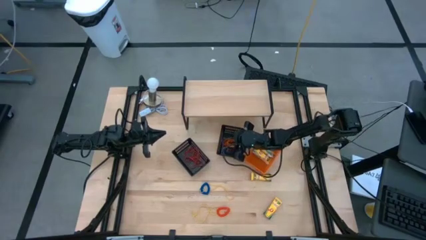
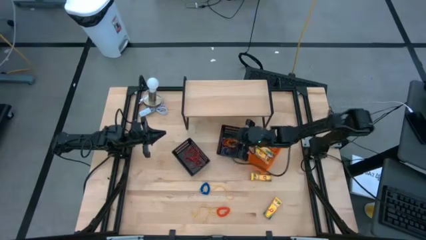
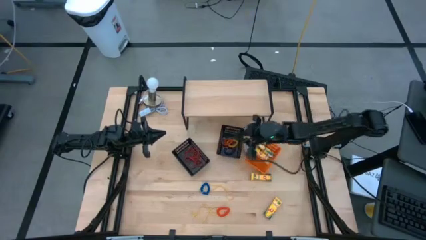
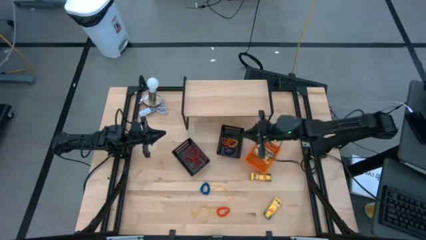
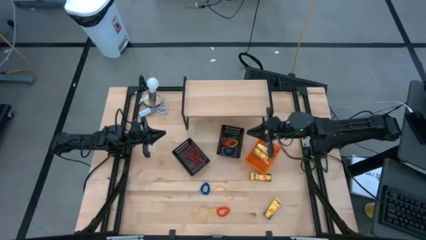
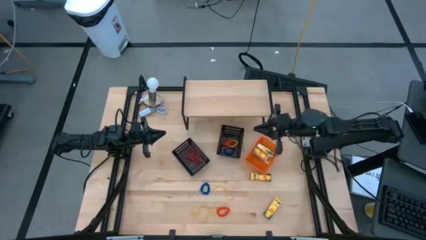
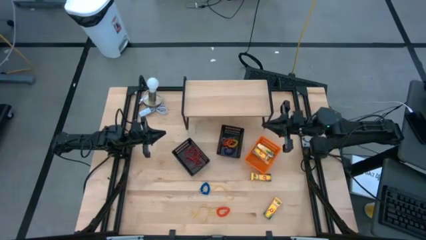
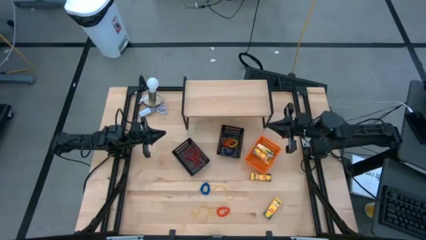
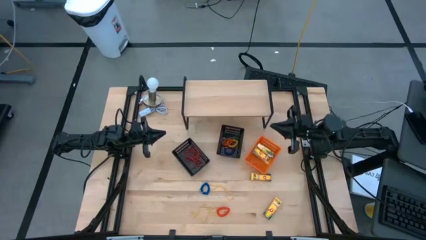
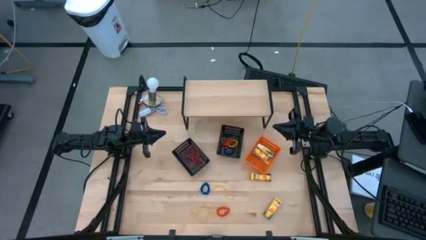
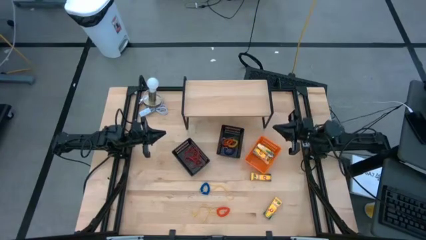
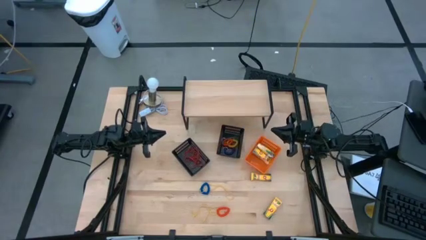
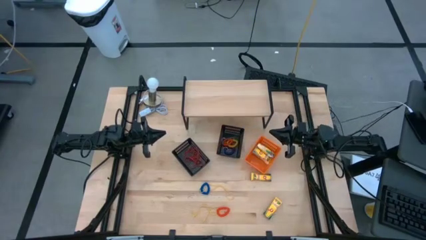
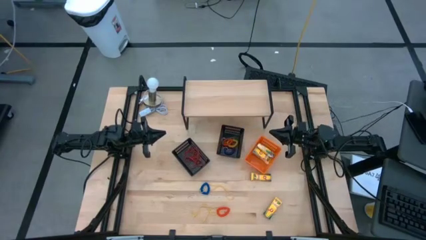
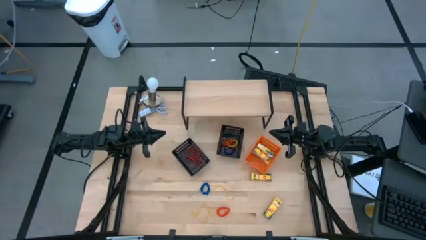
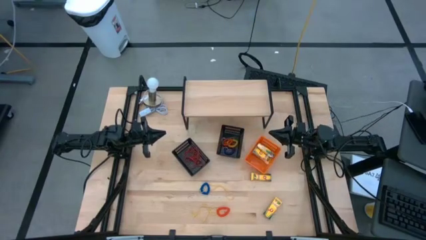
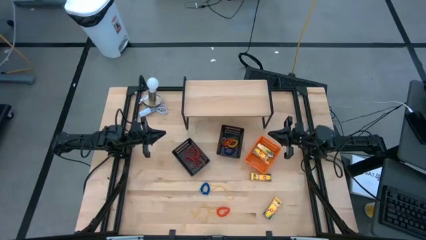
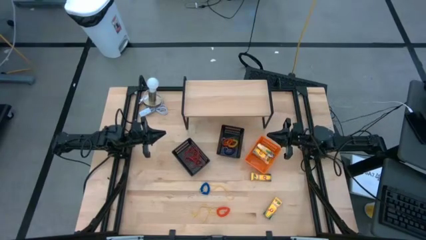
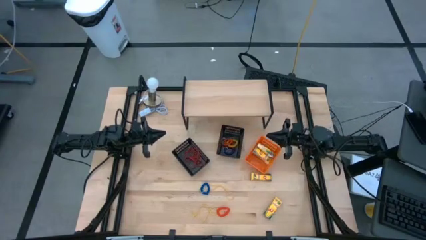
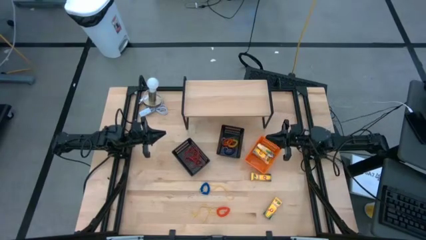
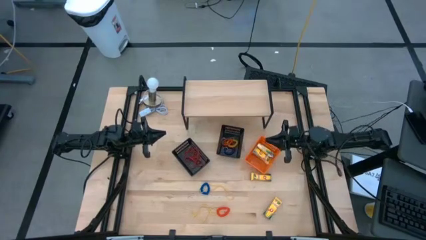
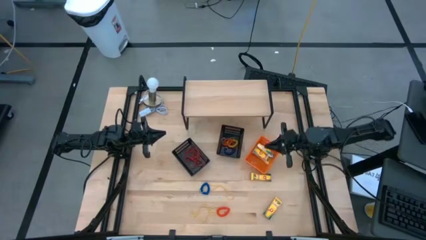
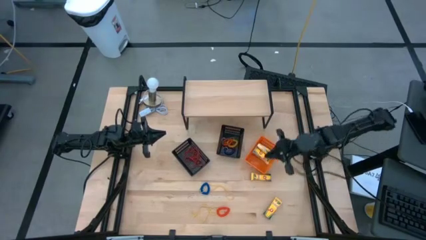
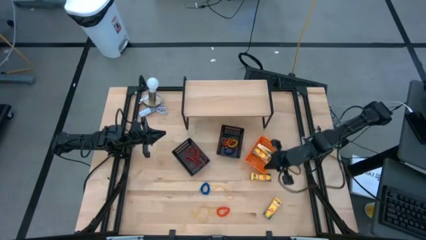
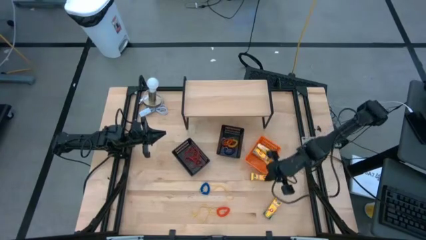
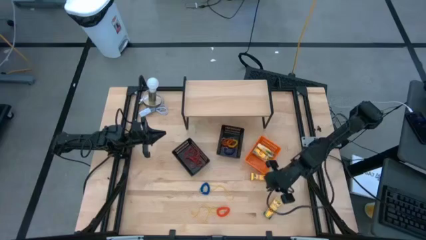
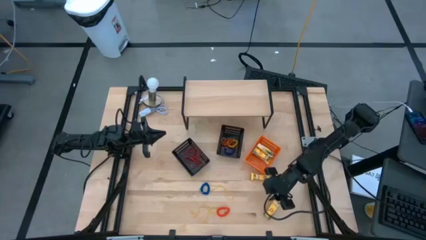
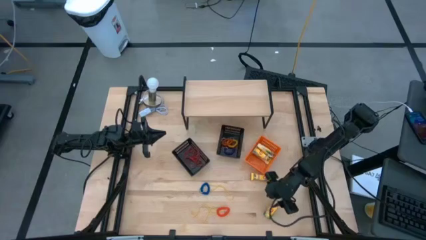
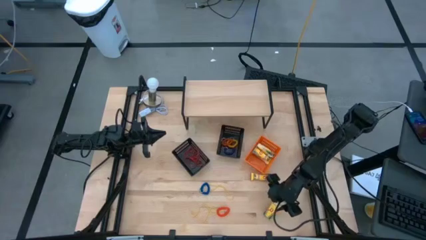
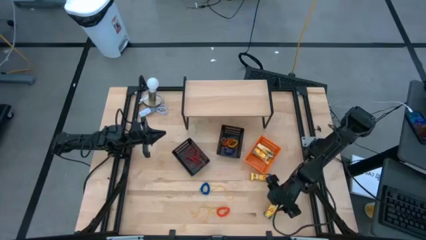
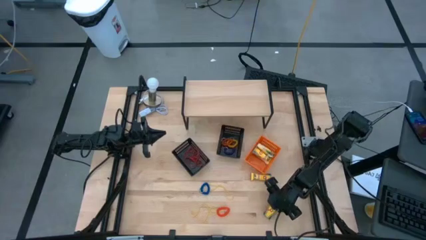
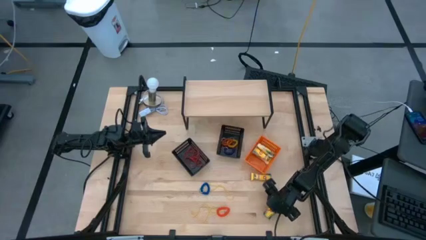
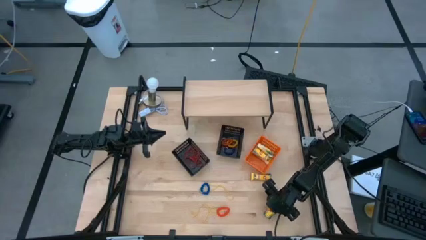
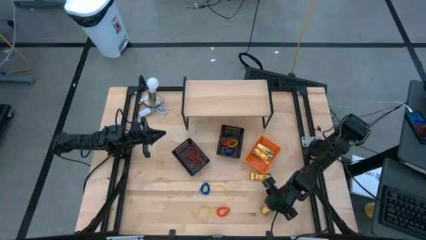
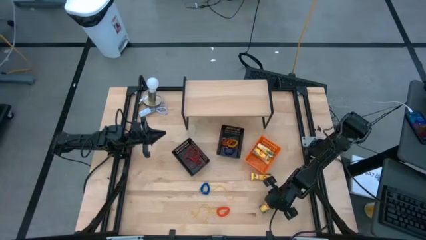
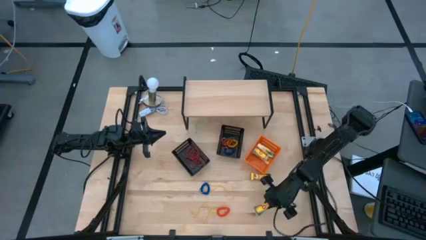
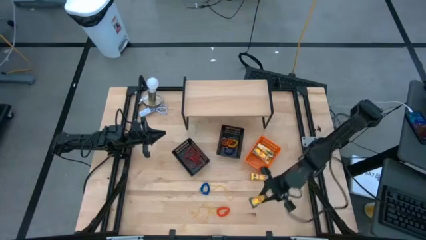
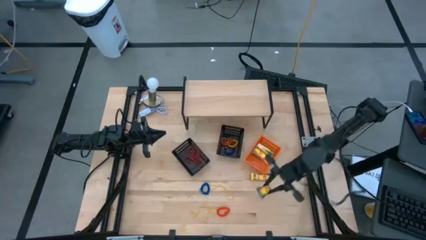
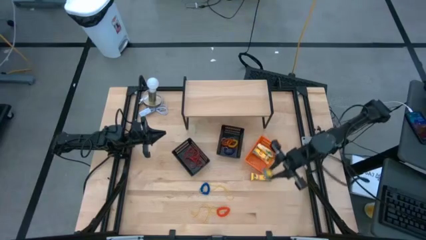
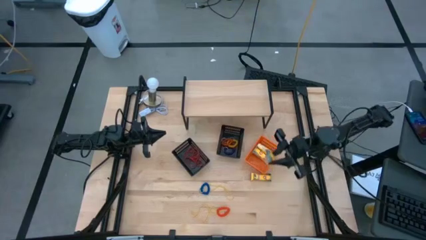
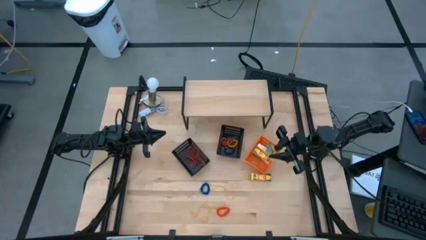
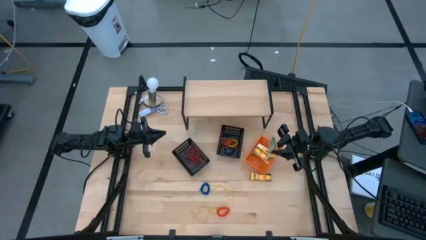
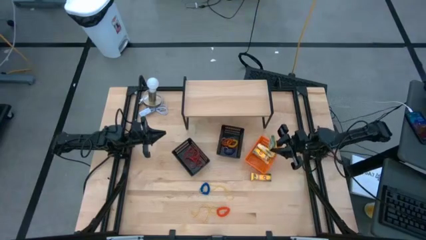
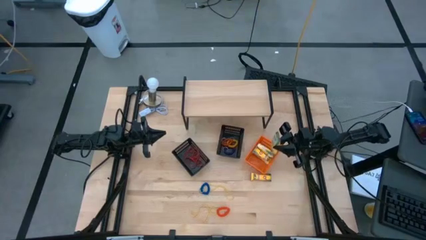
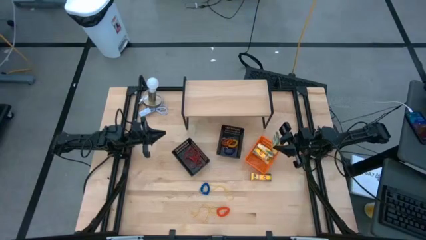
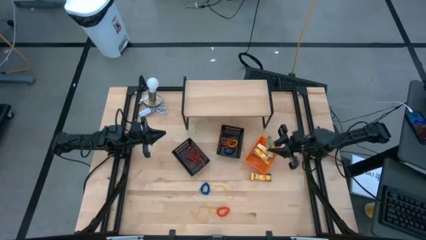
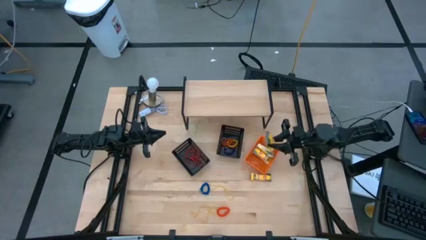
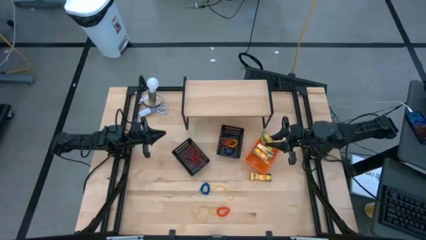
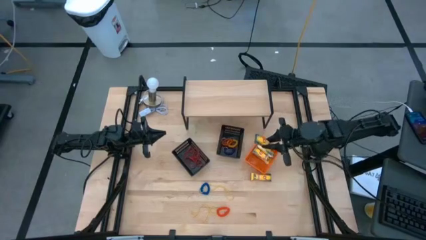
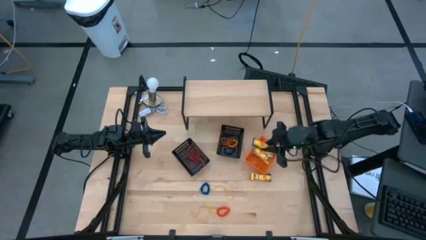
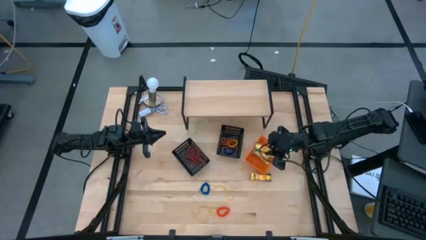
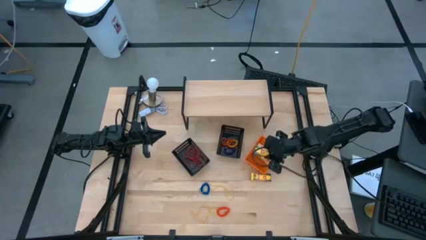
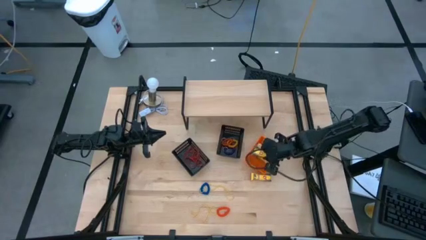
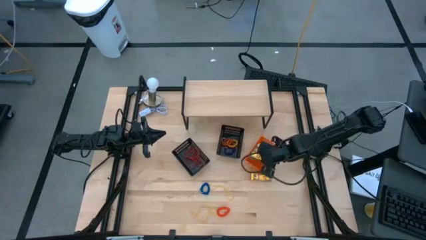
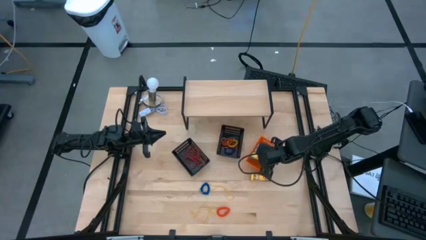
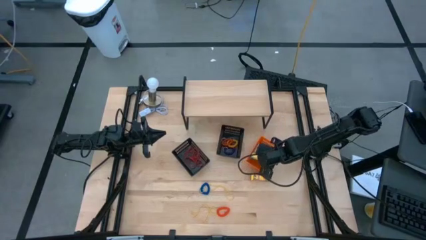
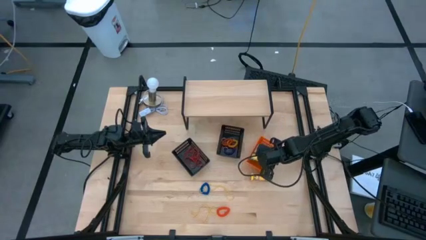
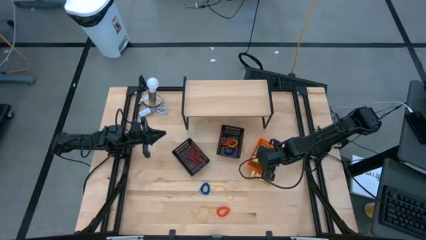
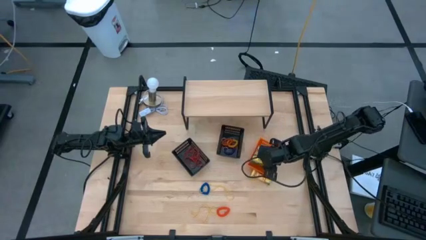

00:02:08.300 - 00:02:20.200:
Task: Pick & Place Office Desk Supplies
Put the crayon box into the orange bin

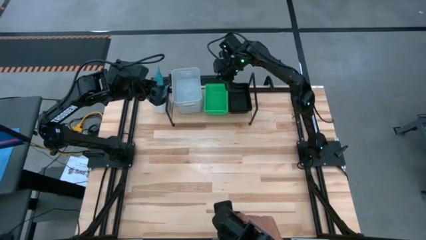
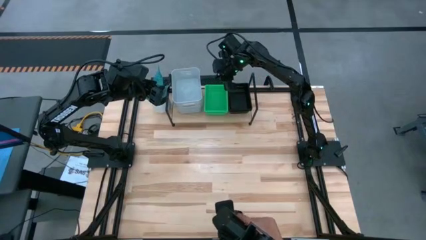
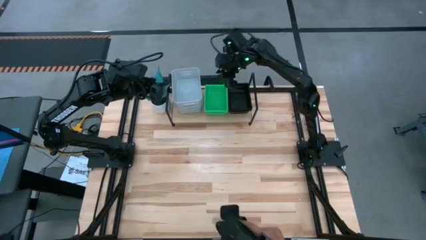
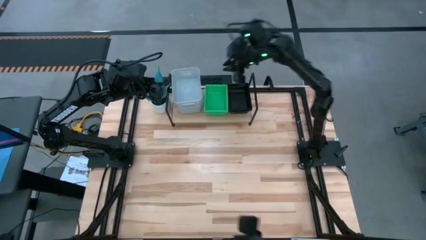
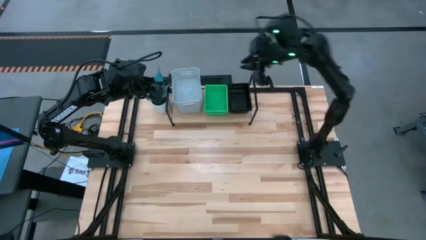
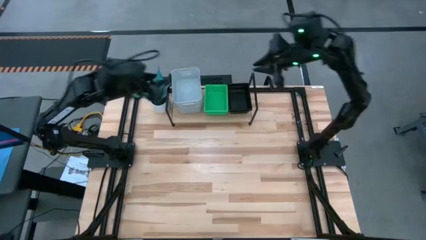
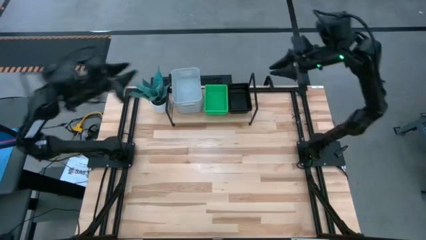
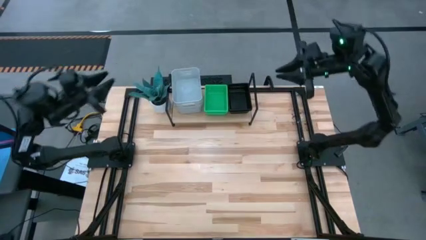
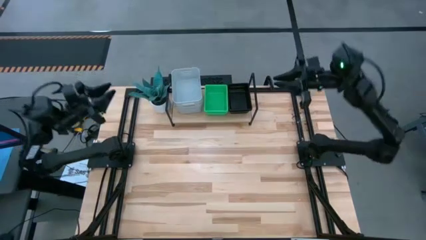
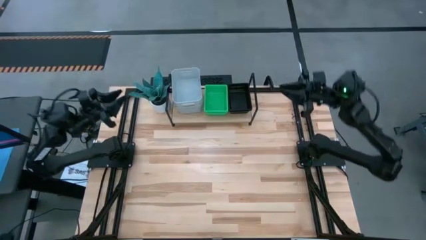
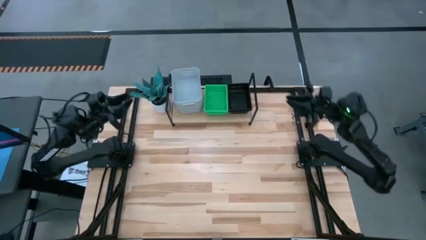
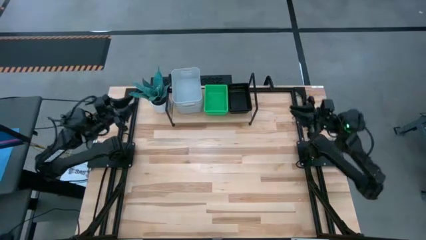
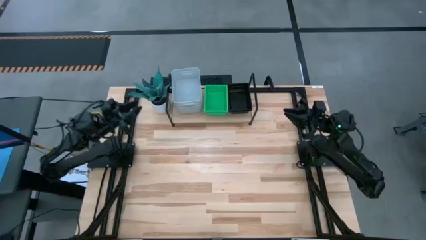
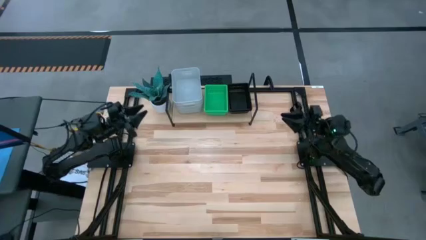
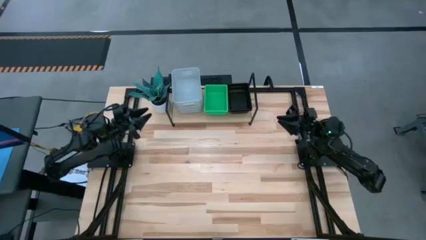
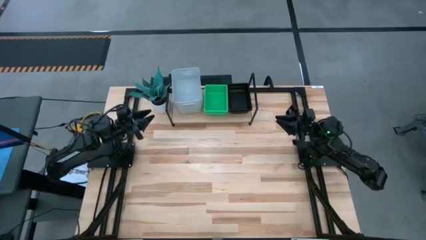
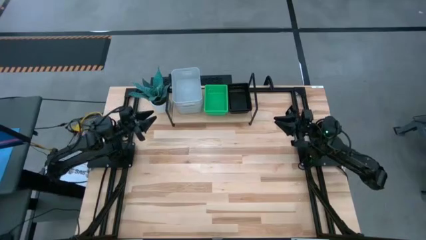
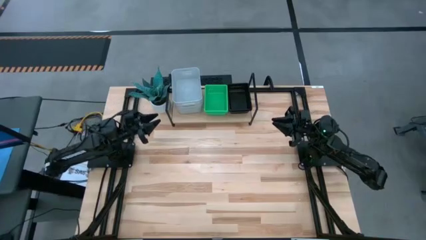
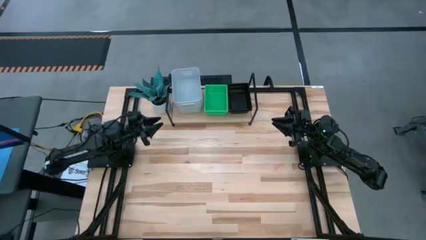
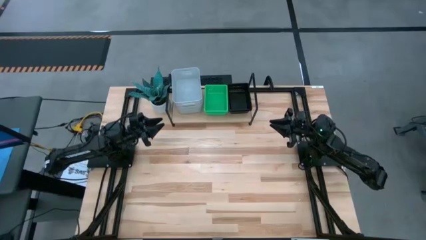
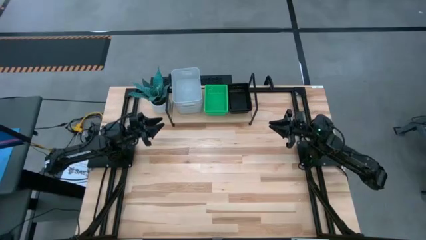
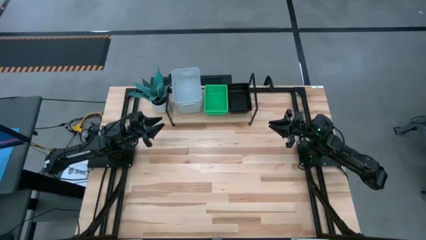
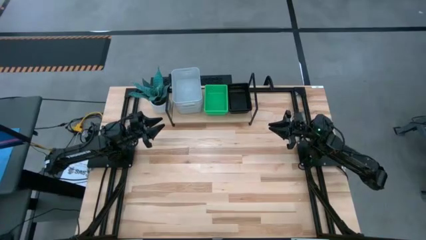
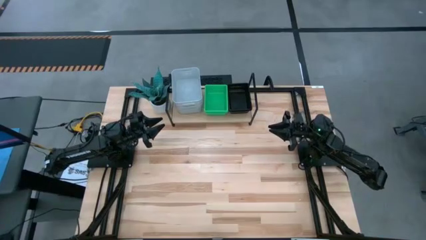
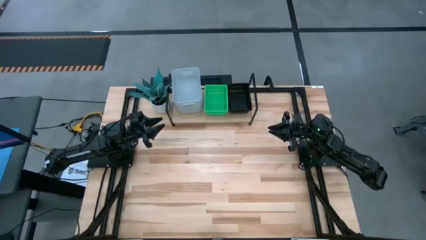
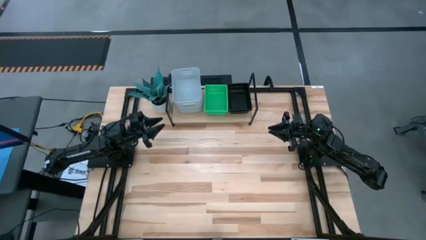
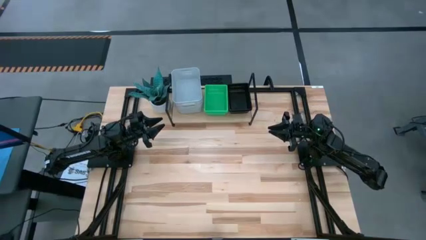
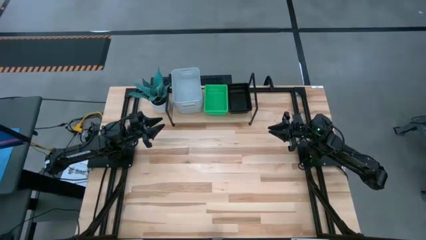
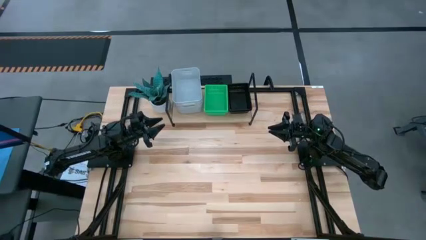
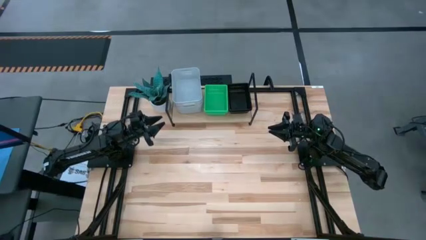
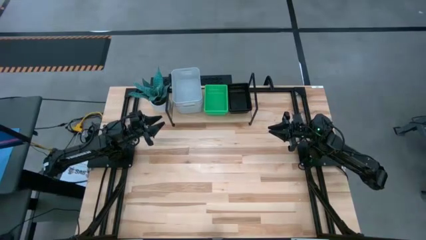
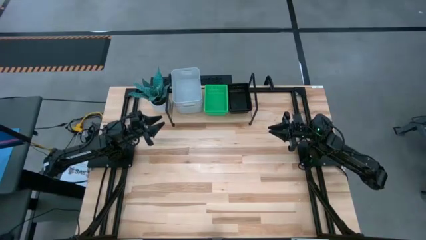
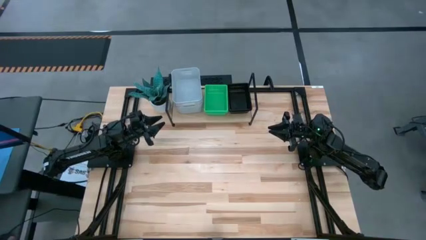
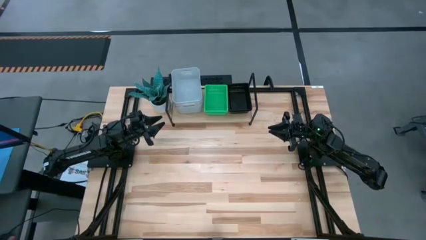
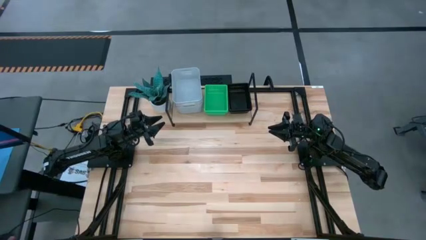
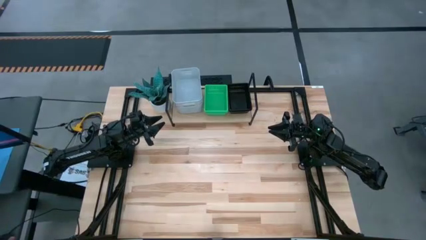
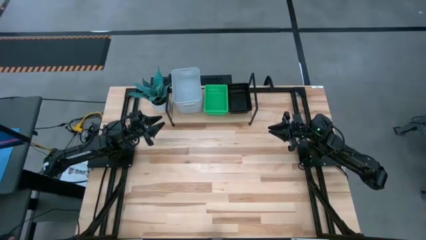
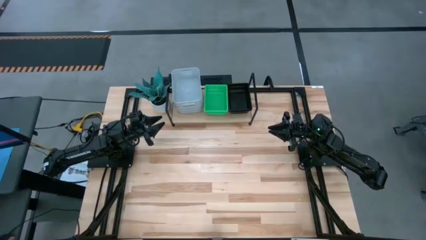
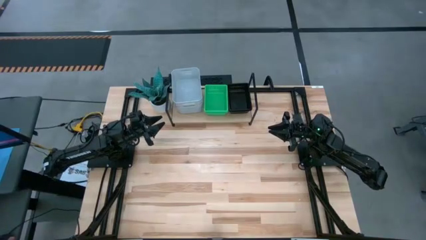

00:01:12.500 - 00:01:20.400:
Task: Stack baskets on shelf by color
Return to Home Position
